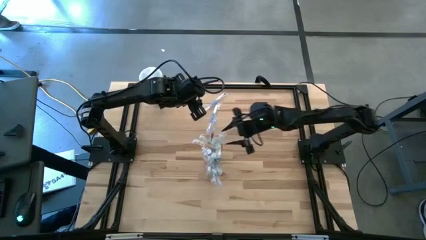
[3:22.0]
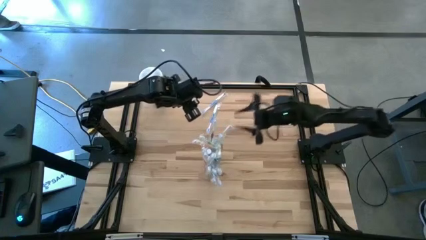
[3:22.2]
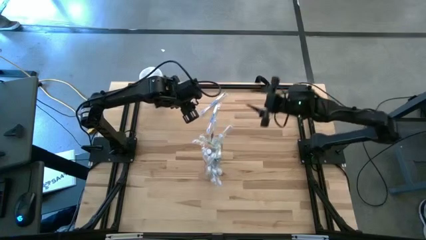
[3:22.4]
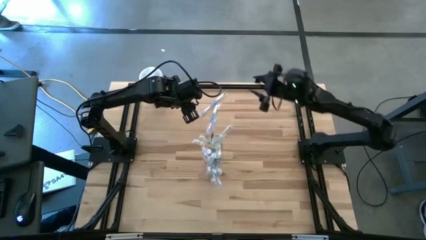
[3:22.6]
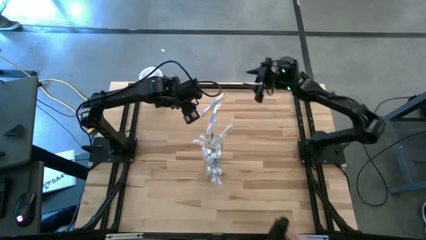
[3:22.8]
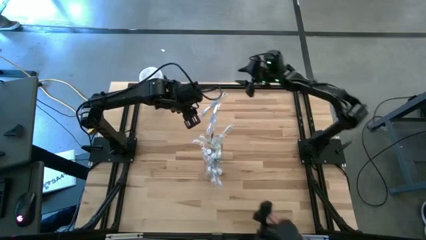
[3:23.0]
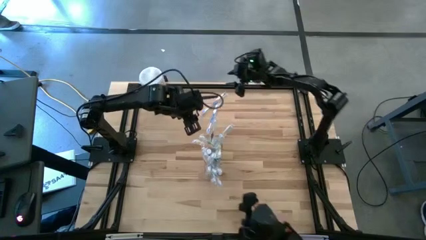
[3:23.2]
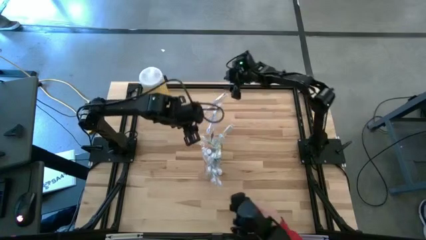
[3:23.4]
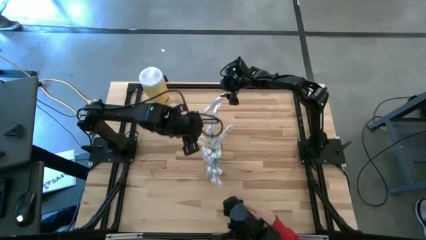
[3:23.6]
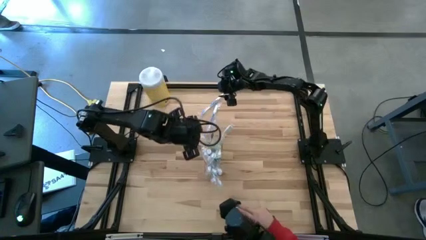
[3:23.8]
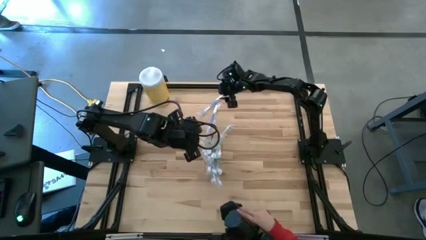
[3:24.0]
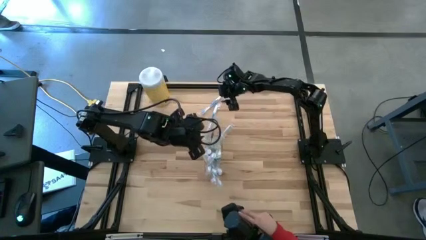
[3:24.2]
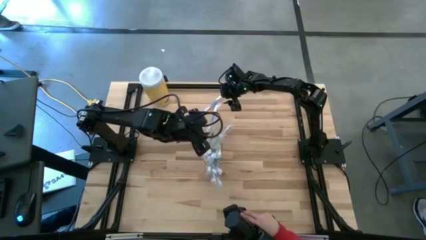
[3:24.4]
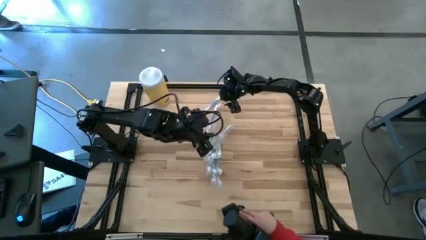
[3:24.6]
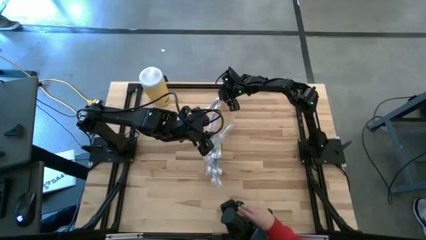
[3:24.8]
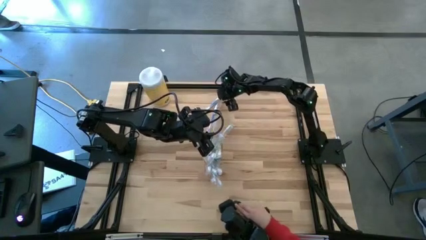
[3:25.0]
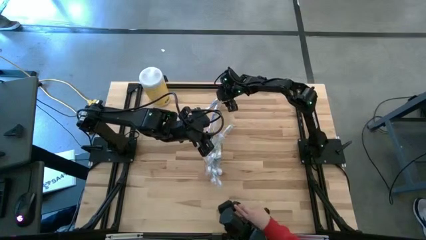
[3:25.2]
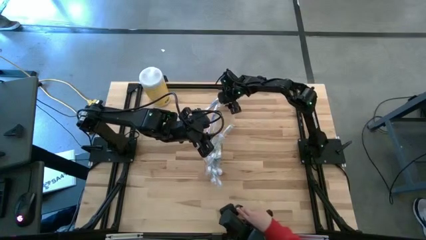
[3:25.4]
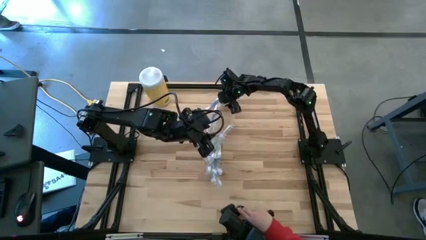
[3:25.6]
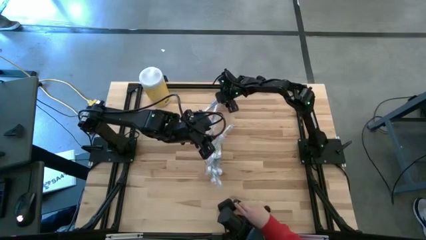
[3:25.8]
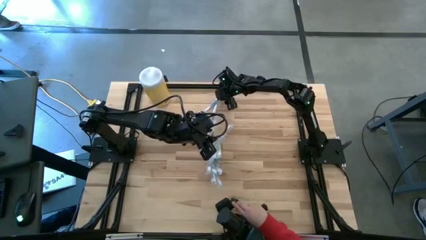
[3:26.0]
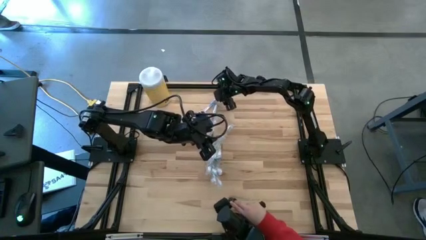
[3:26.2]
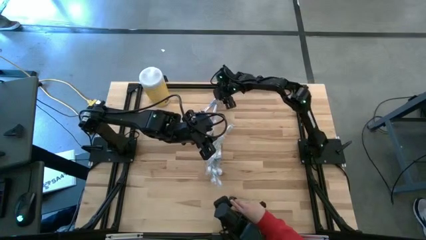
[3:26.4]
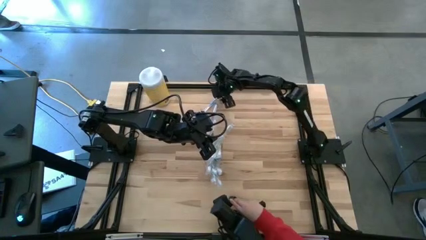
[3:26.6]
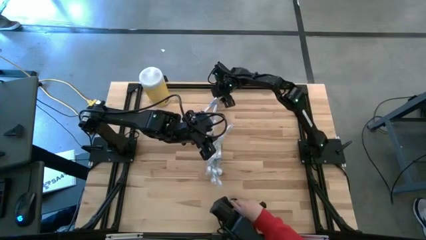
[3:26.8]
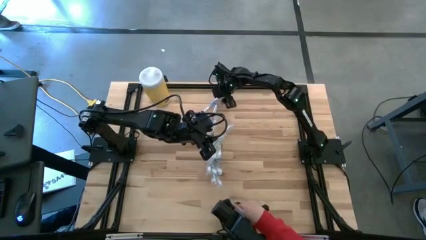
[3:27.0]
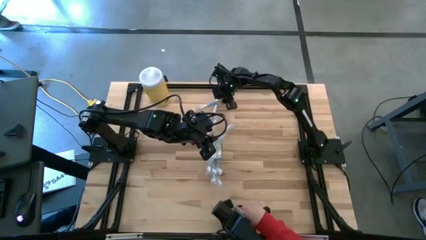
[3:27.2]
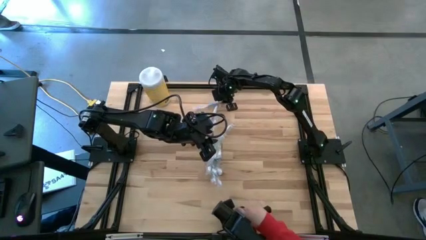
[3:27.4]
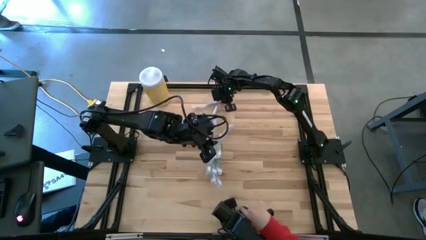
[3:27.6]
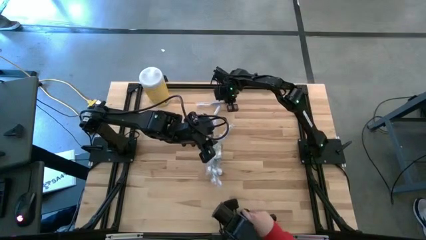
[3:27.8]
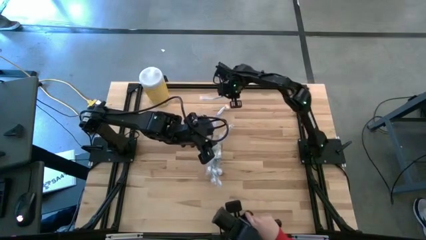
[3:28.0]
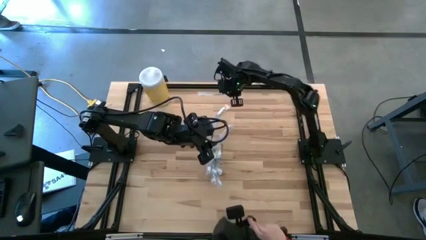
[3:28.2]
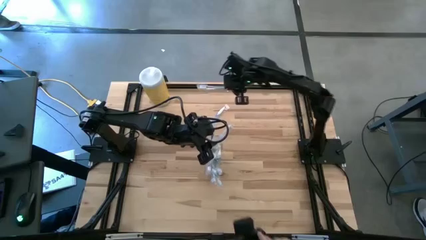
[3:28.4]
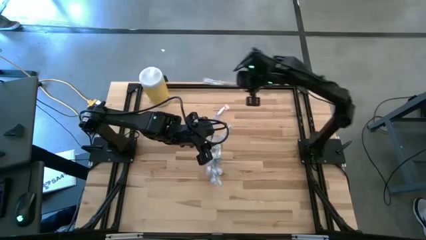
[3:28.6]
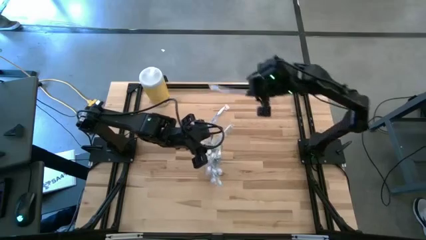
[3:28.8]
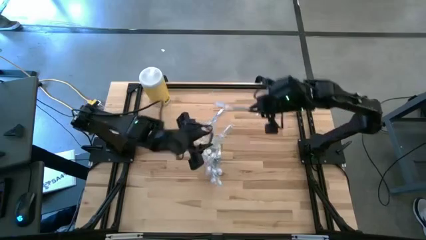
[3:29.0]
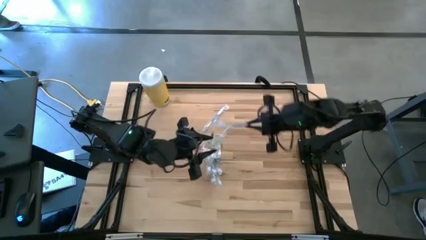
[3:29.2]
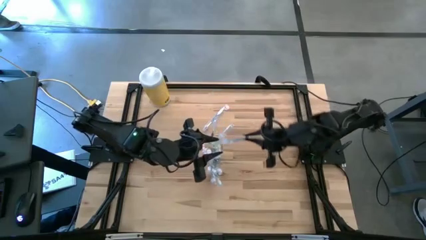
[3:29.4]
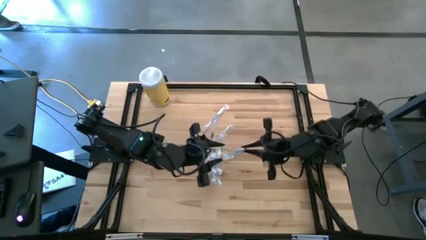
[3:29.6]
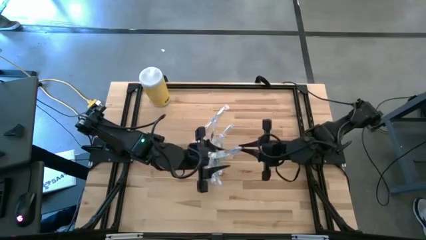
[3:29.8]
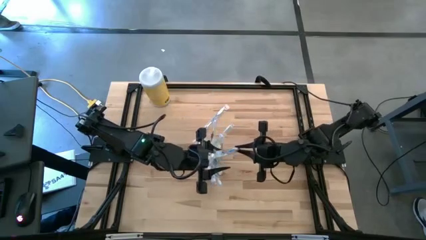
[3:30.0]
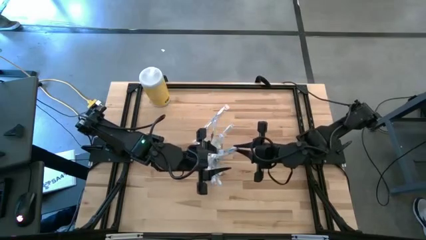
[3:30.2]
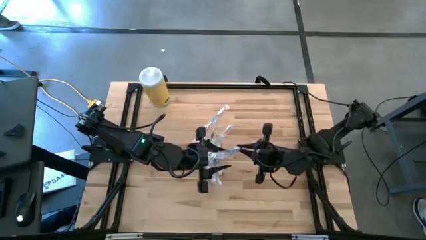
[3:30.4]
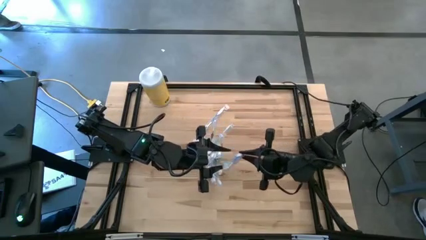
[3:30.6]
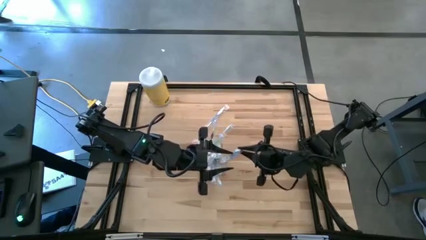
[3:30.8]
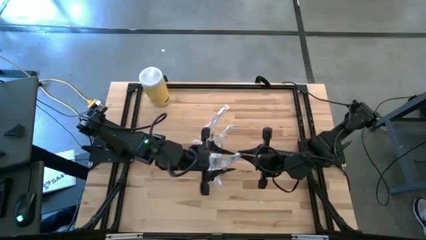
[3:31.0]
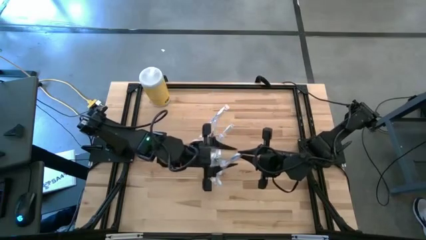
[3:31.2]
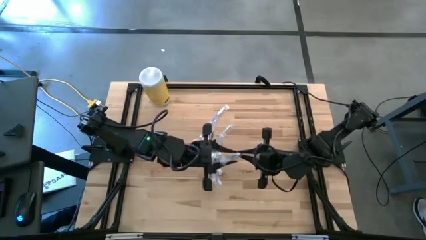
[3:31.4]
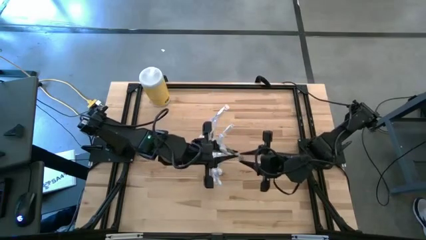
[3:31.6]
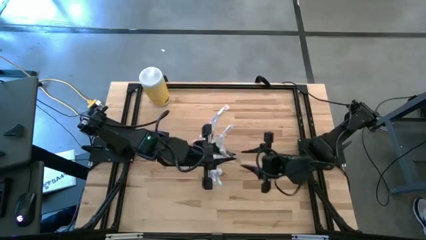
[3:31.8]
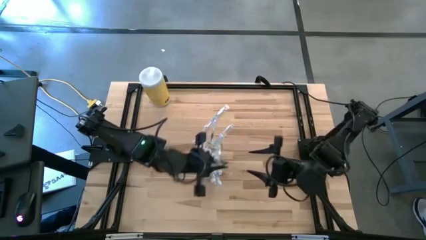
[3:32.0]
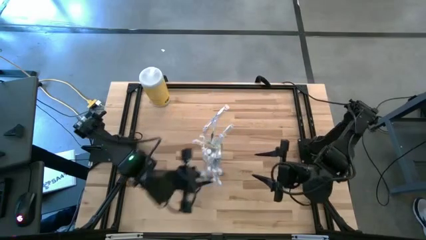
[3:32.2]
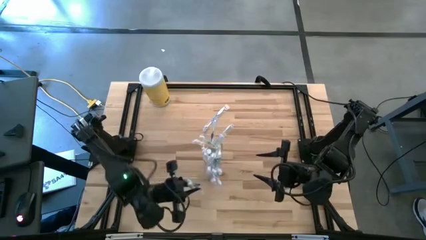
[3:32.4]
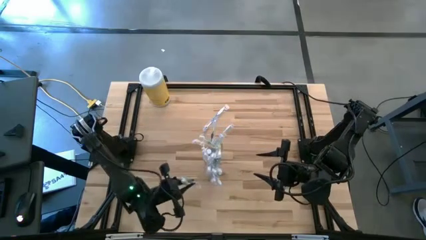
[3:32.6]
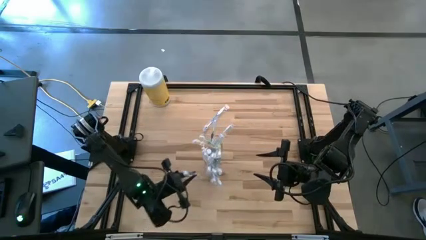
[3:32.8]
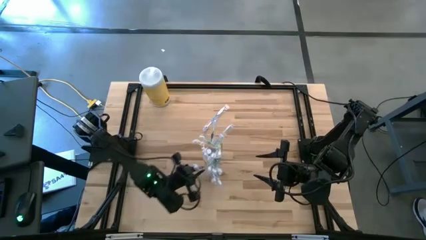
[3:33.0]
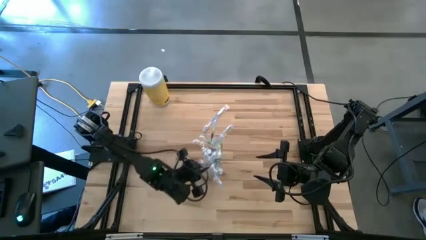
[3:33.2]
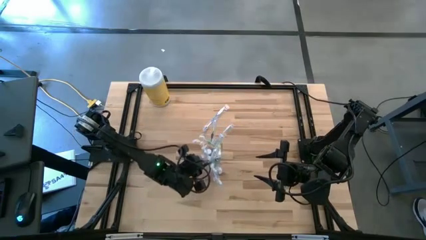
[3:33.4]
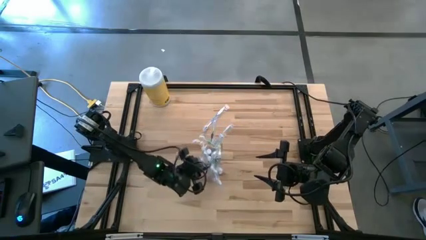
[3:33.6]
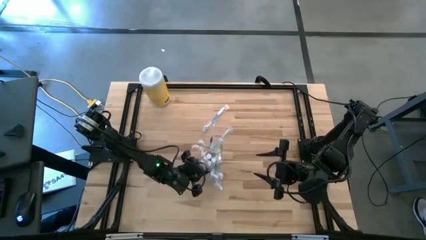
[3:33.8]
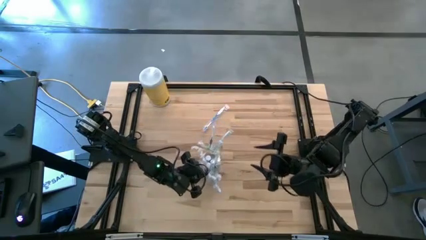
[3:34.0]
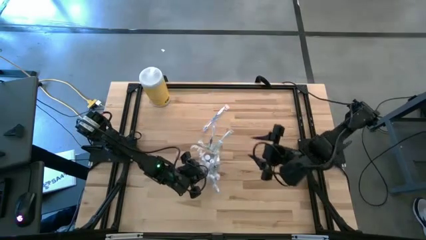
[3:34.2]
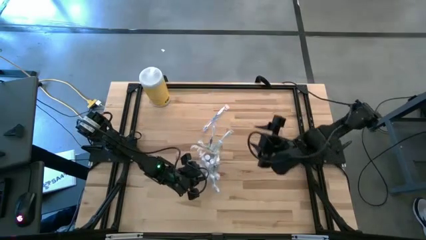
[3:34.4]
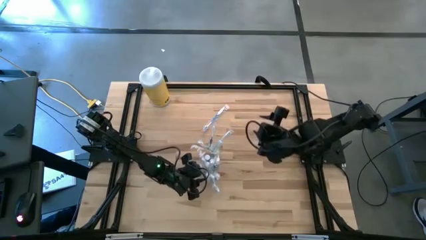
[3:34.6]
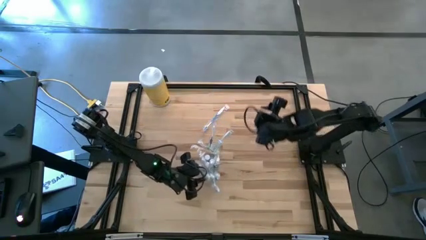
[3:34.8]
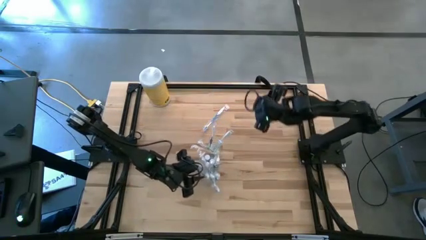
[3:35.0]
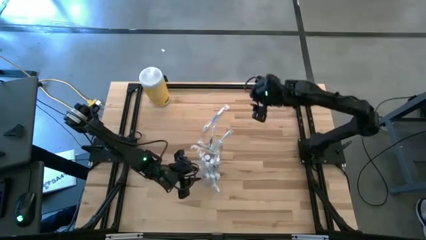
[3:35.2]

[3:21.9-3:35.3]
Task: Pick & Place toothbrushing station
Put the blue toothbrush into the transparent organizer

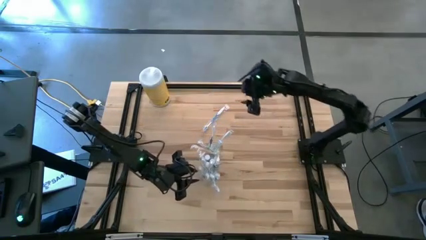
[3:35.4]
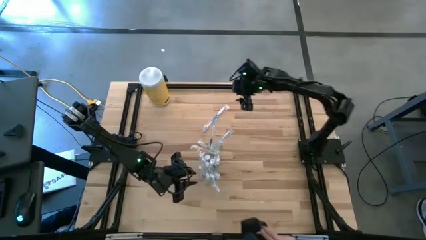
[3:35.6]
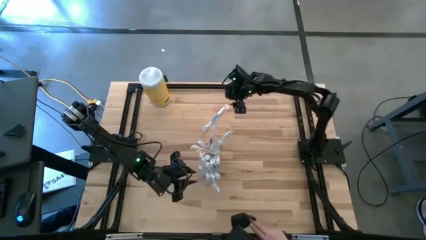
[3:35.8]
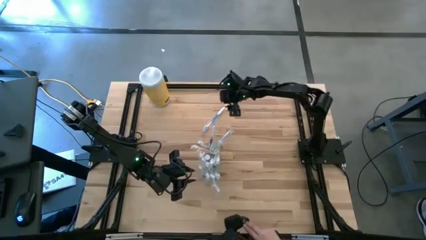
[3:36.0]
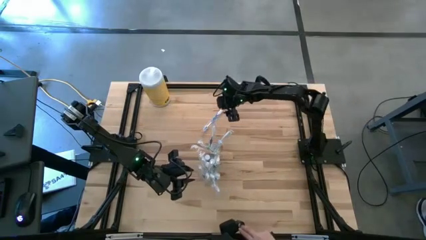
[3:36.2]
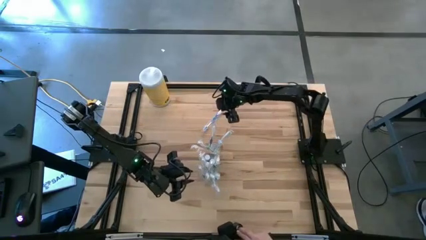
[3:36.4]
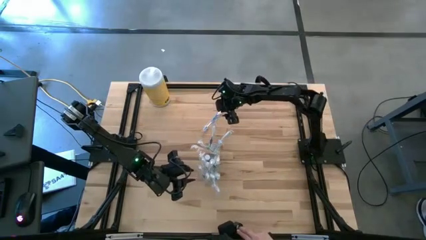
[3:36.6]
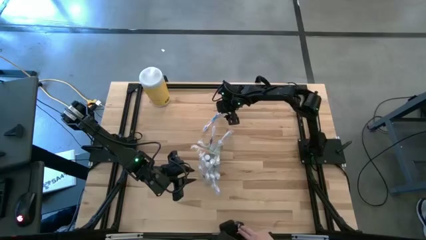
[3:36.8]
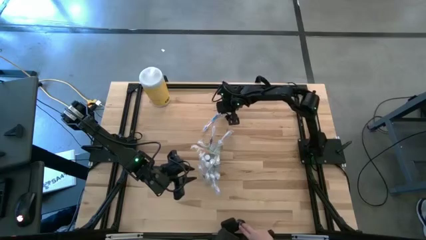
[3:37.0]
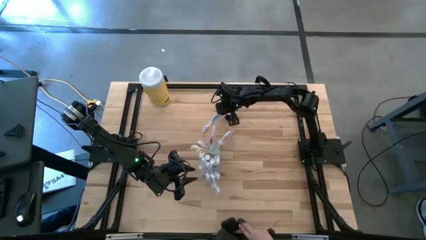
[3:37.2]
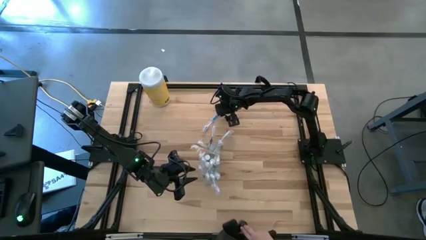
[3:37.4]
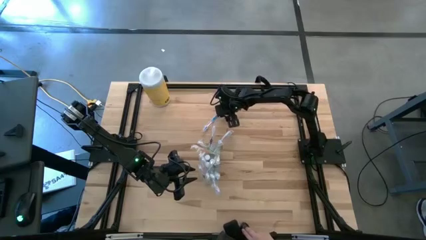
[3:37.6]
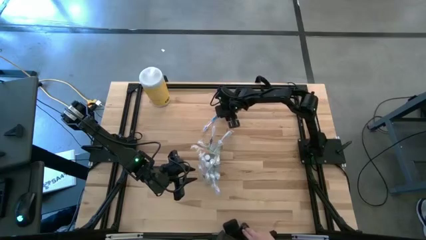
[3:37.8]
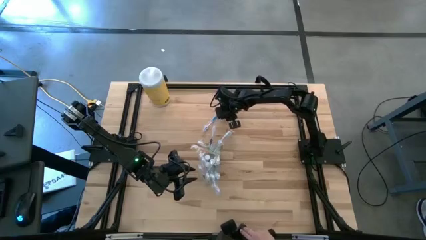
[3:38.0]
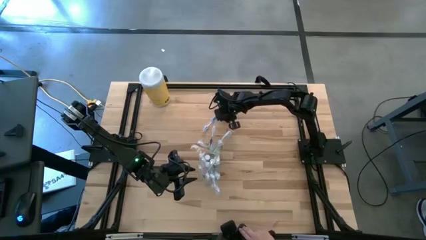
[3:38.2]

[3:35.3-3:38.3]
Put the blue toothbrush into the transparent organizer
